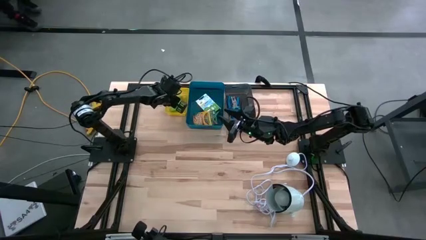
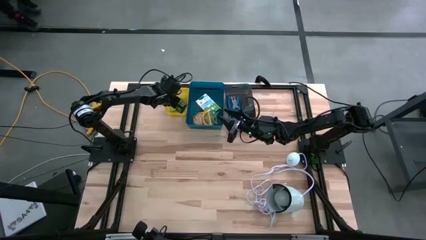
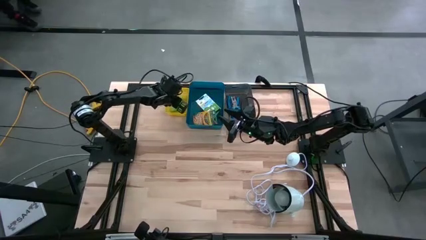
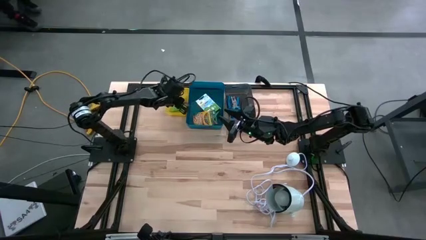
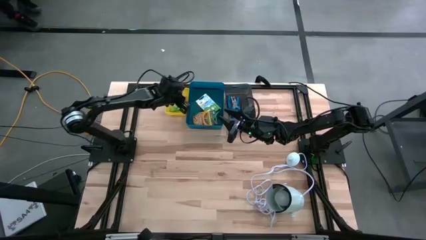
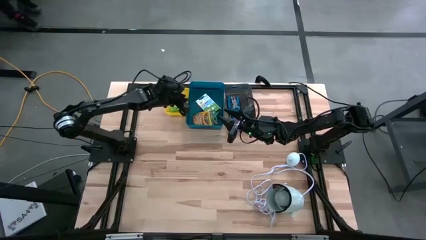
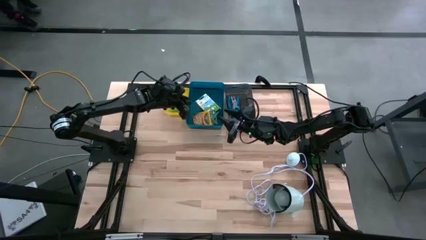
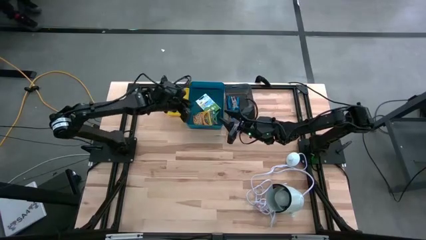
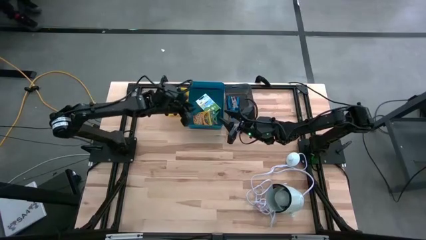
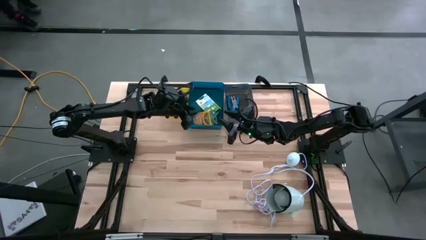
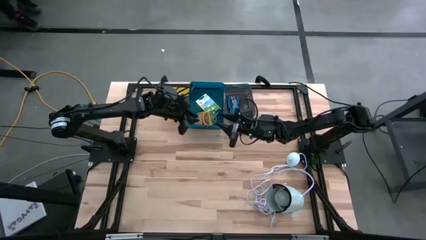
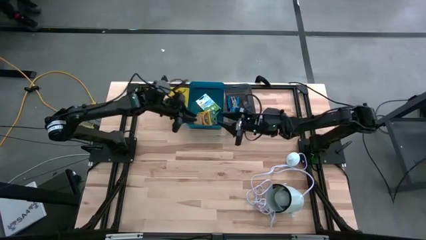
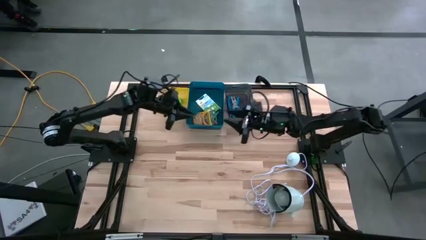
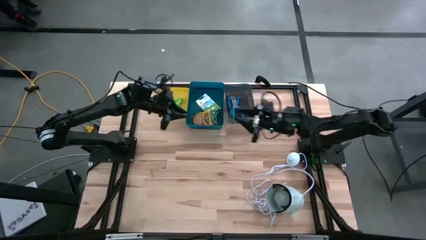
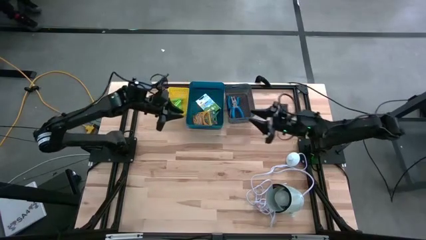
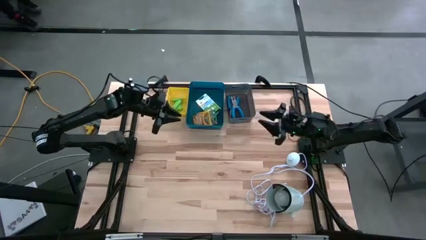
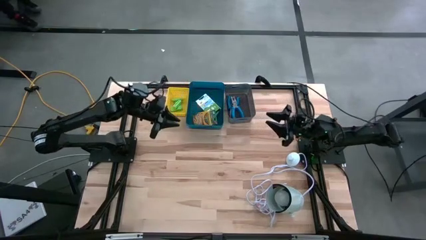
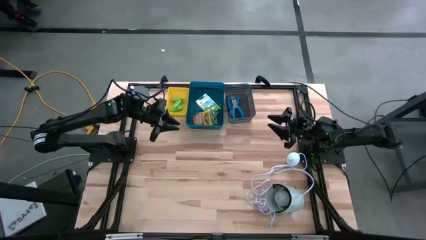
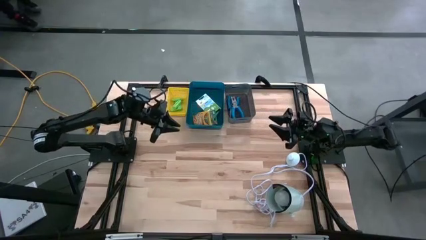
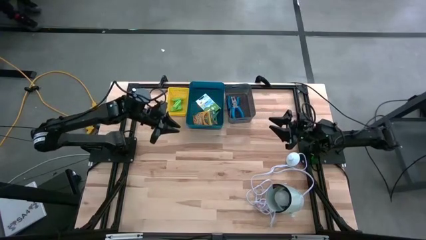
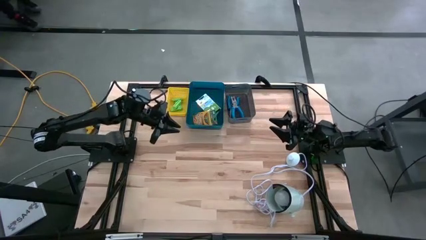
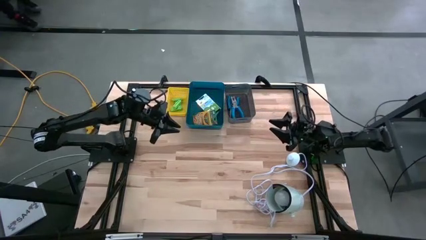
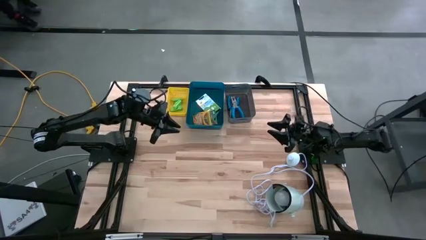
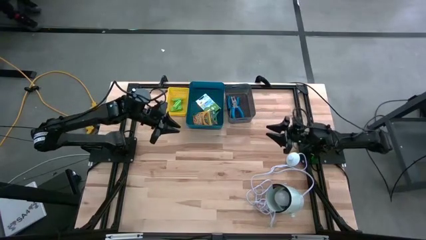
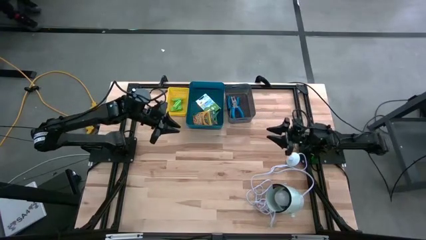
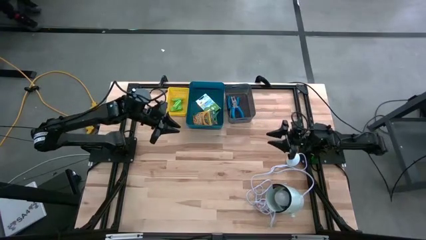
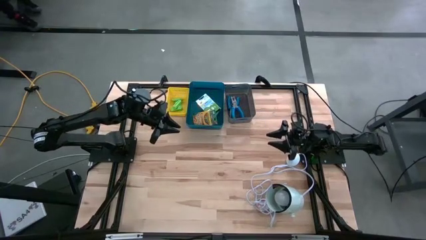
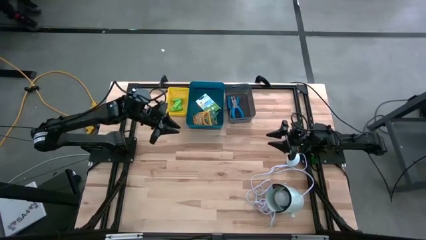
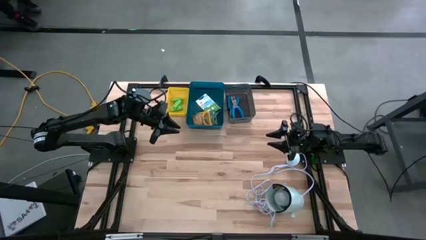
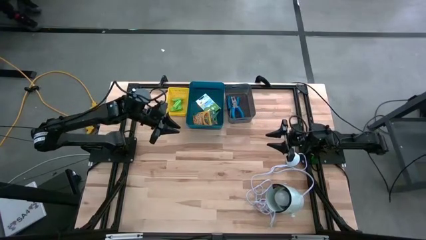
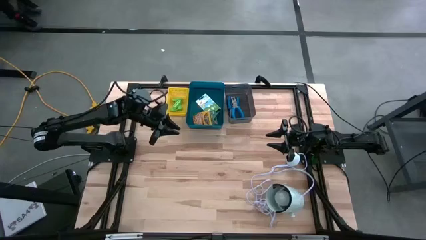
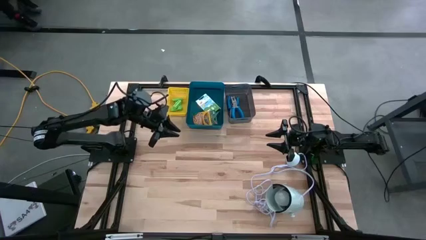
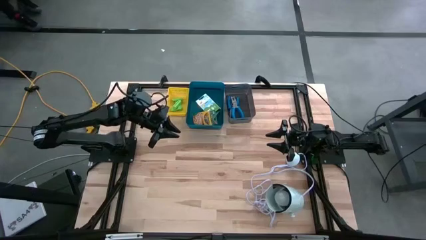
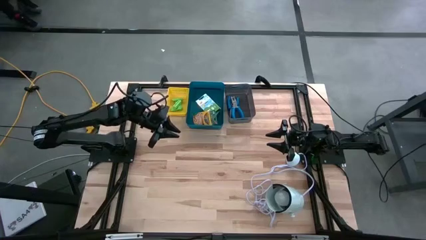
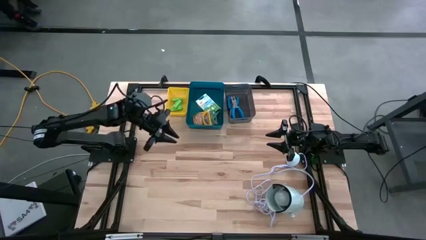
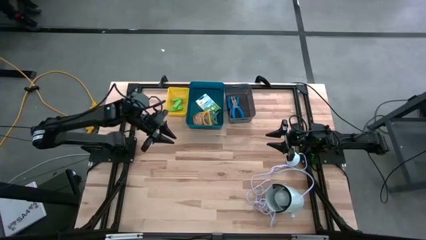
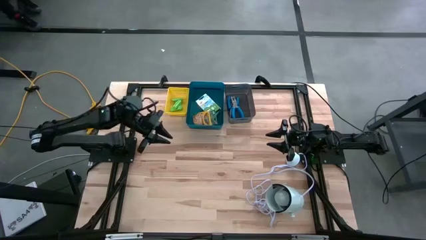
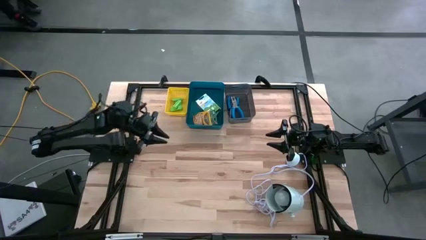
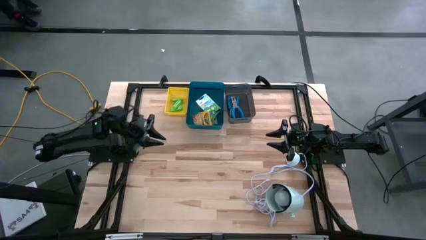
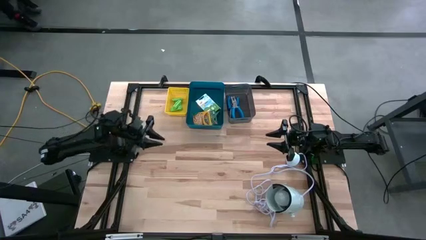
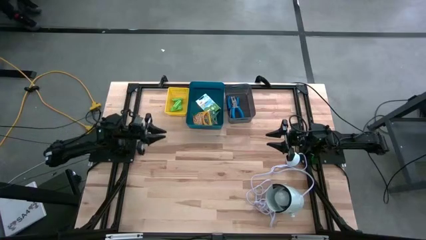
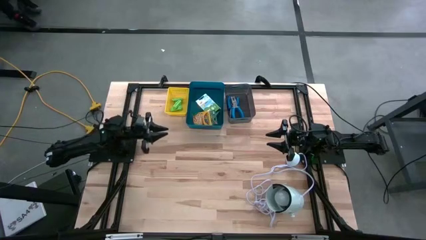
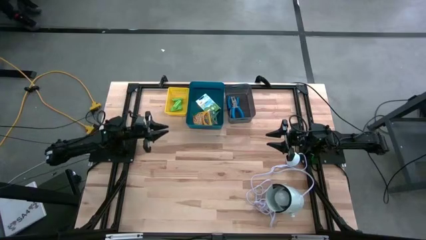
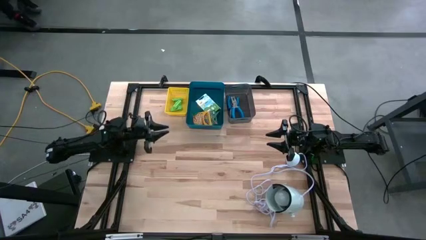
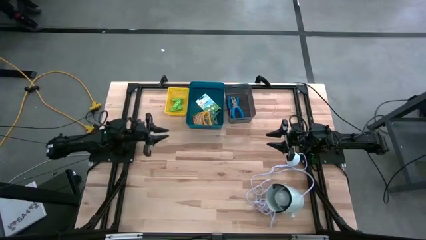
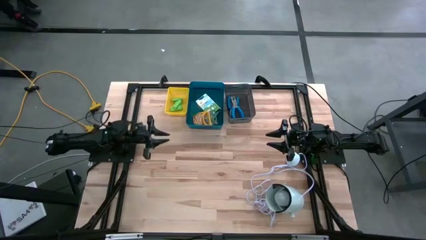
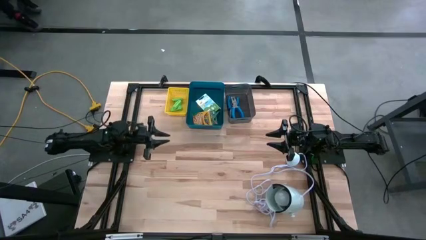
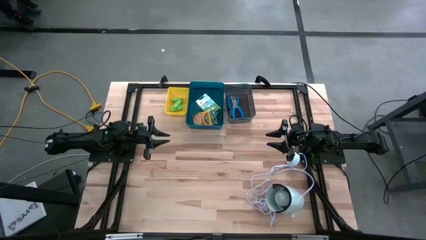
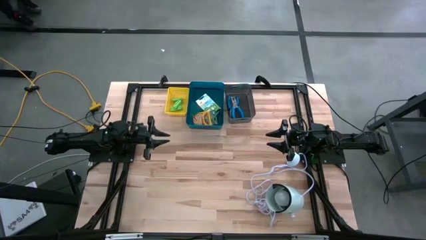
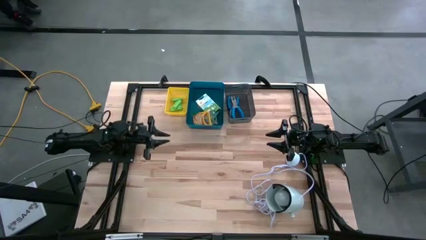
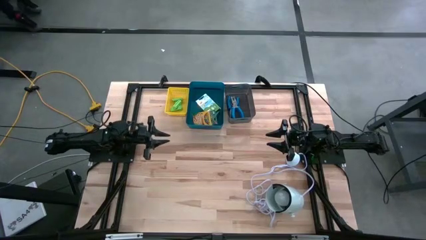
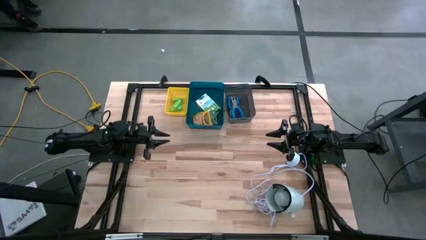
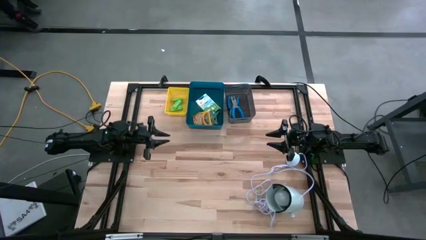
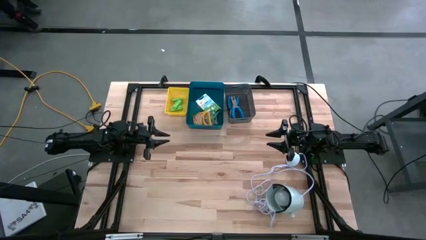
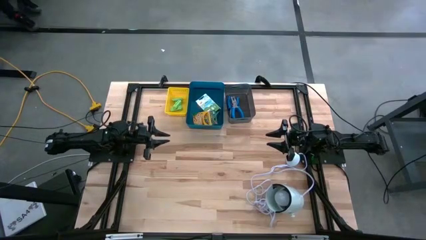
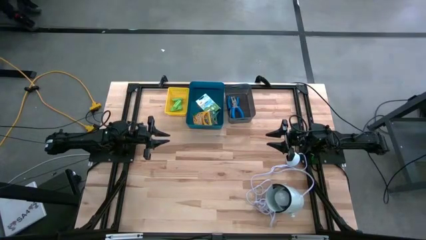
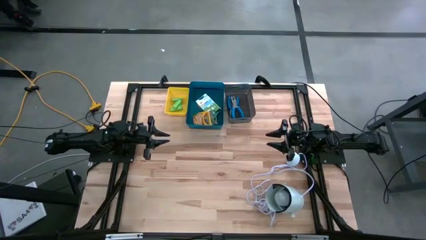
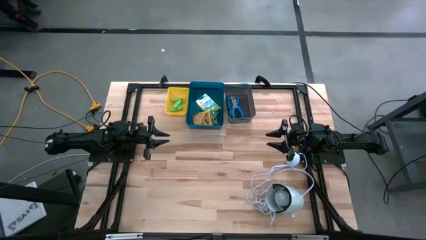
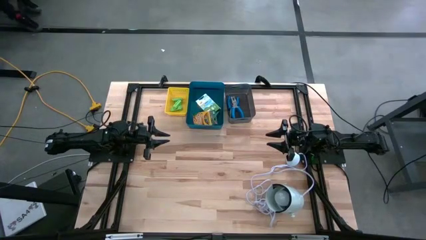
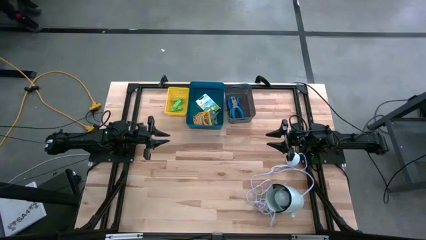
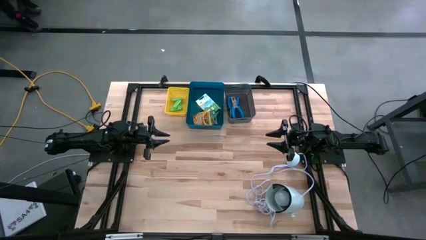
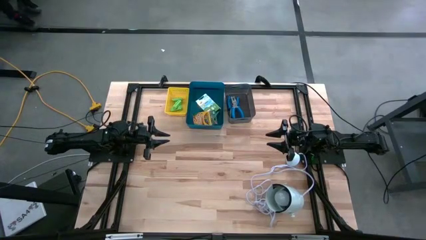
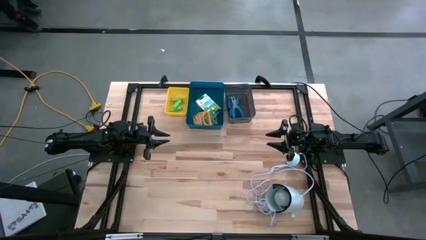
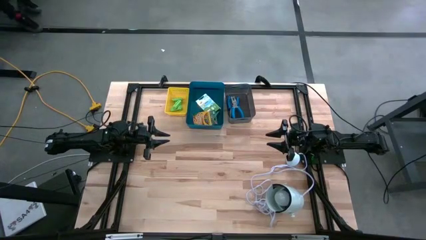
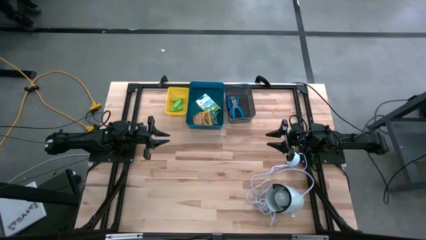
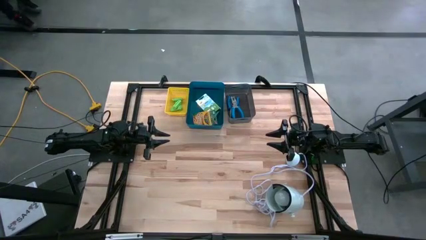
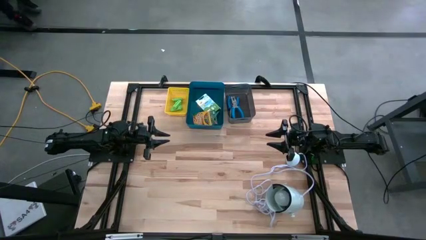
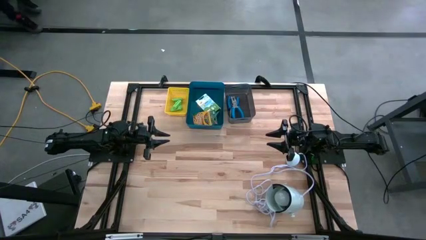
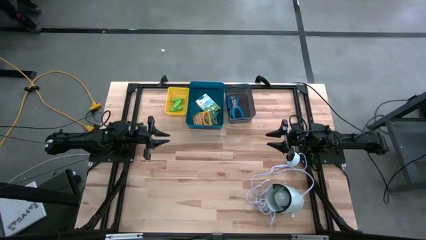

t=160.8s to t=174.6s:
Task: Pick & Place School Supplies
Return to Home Position
